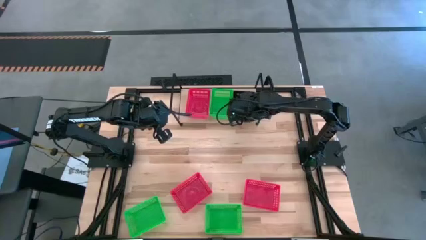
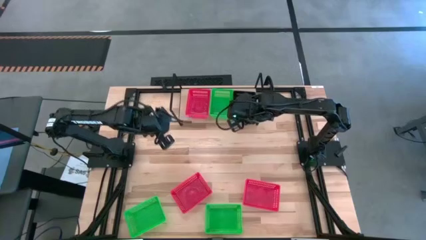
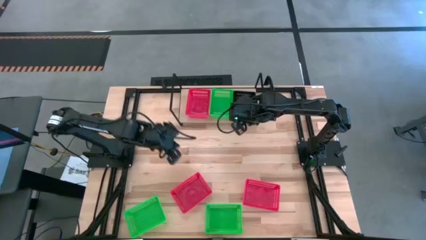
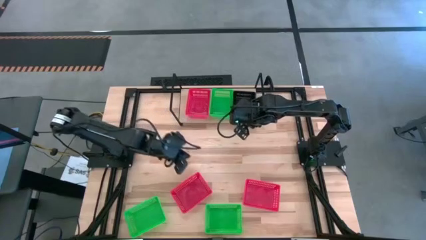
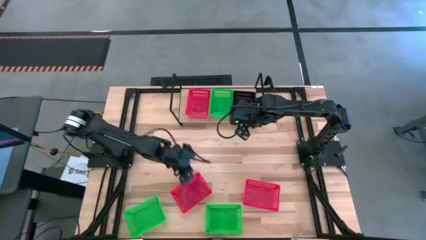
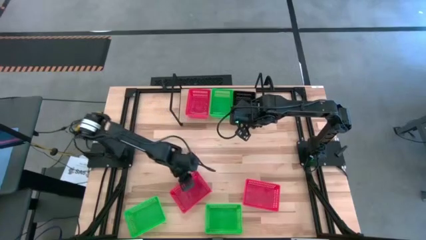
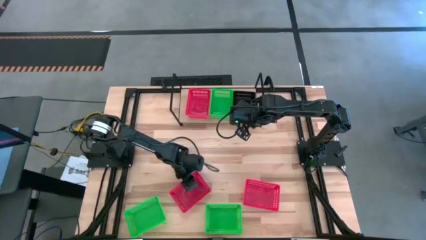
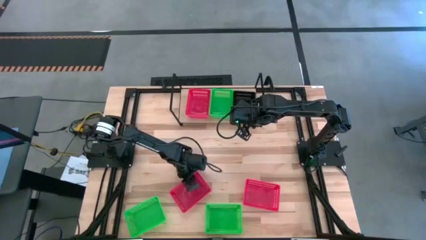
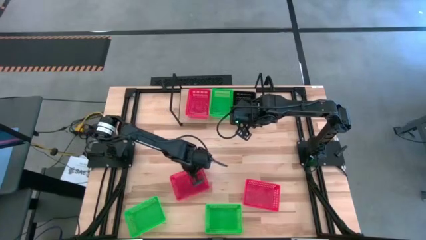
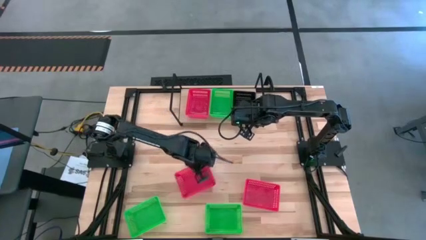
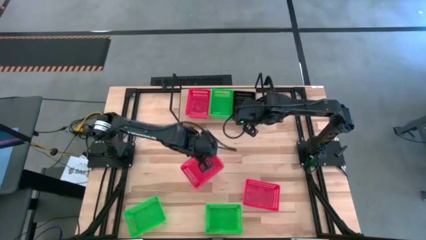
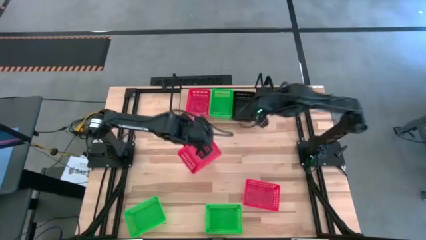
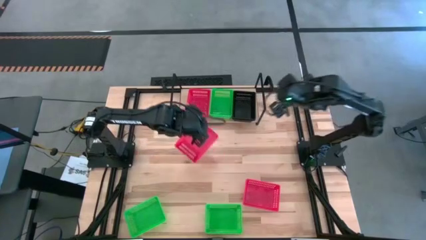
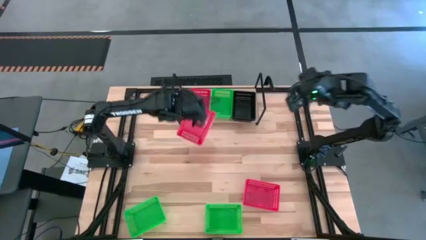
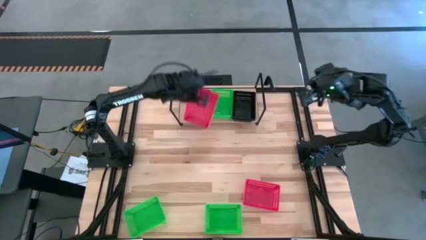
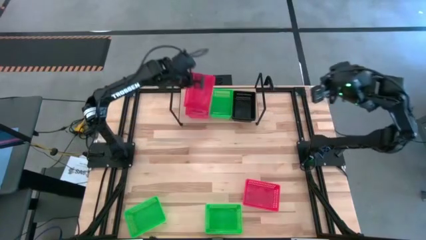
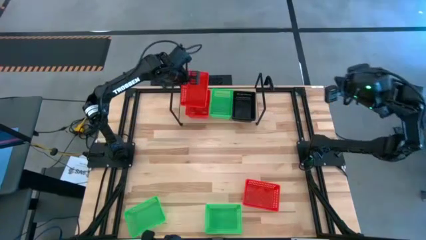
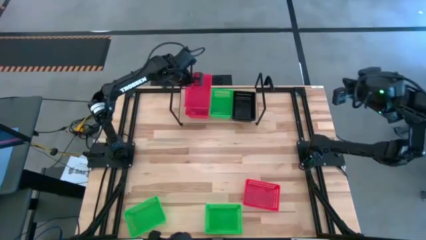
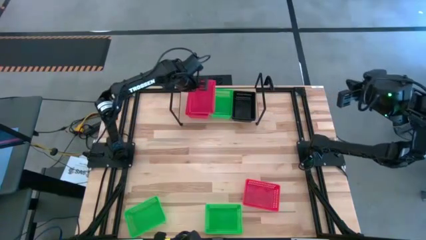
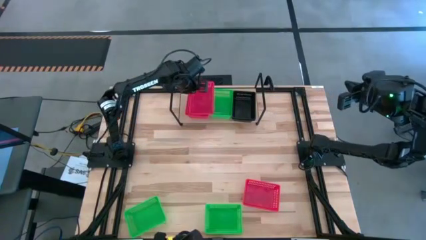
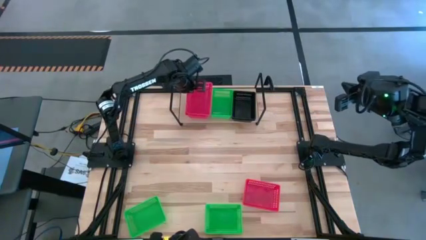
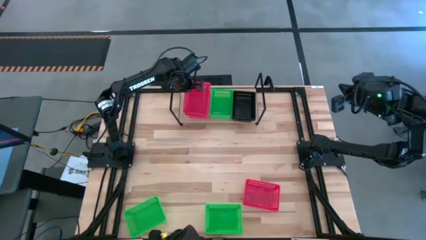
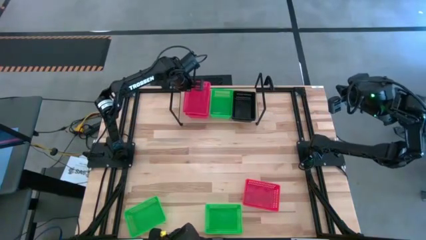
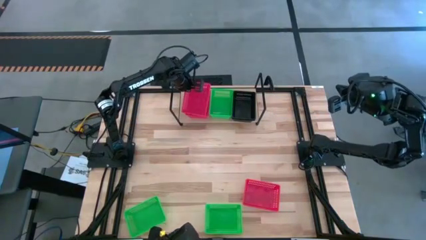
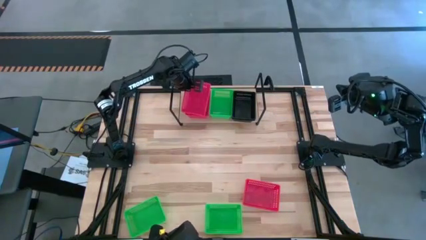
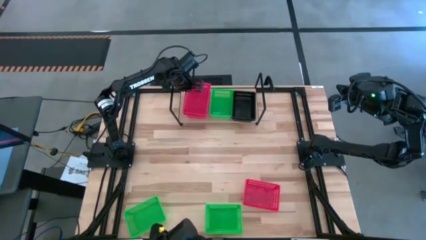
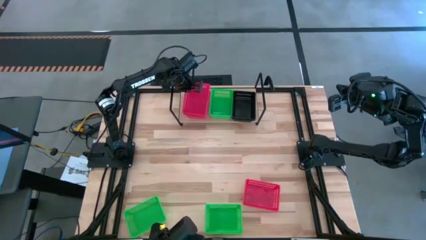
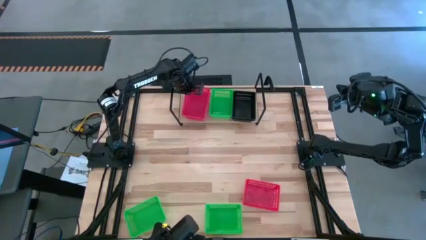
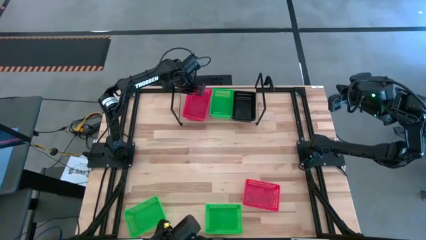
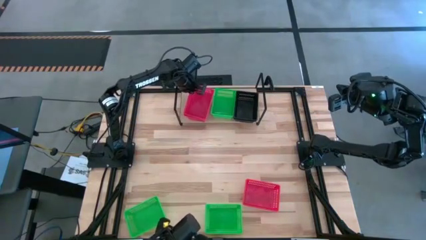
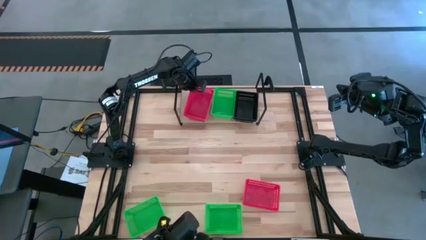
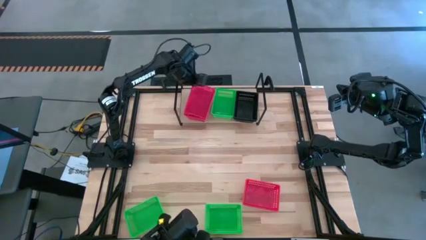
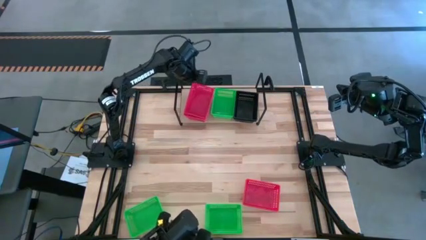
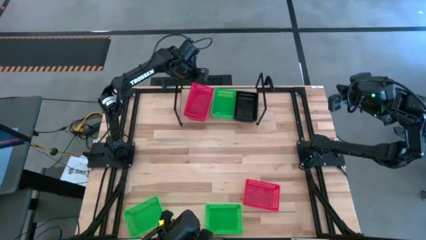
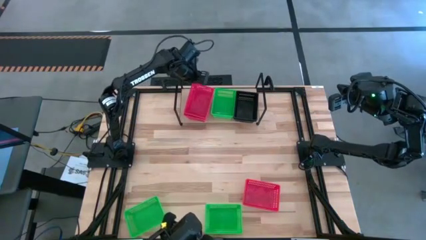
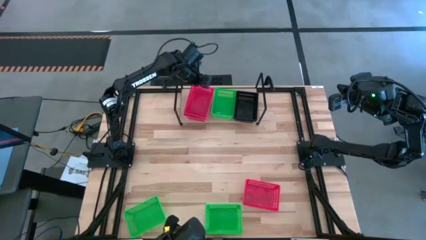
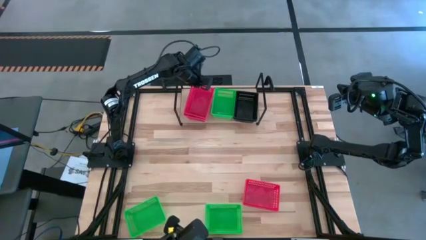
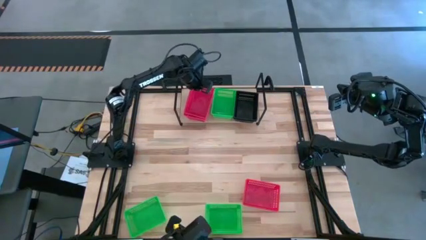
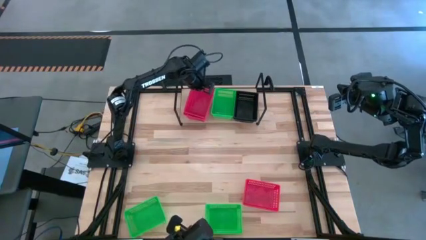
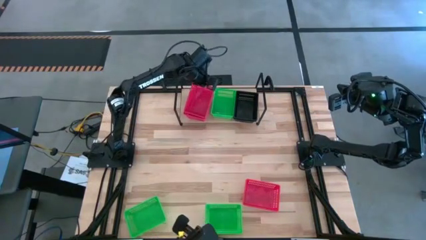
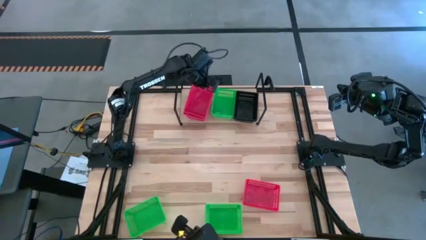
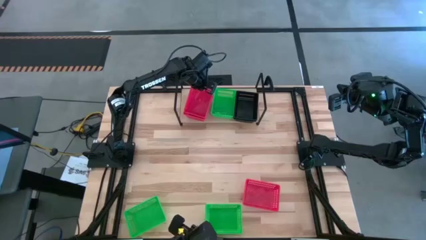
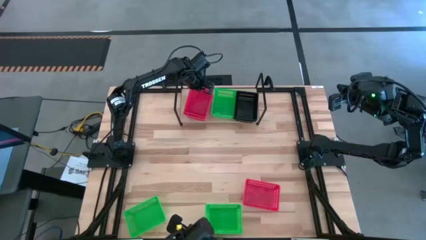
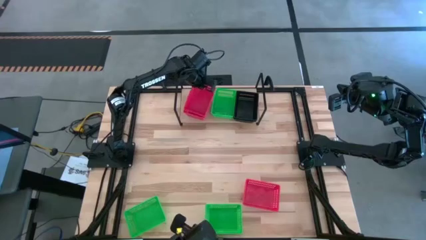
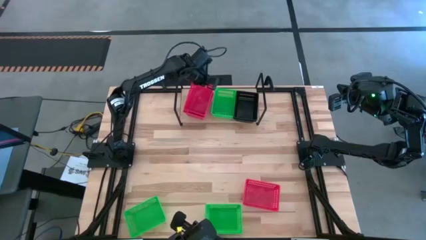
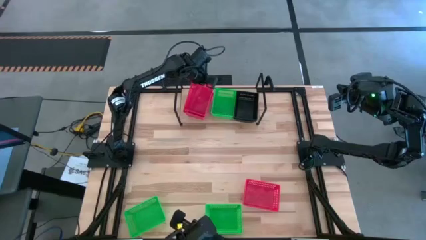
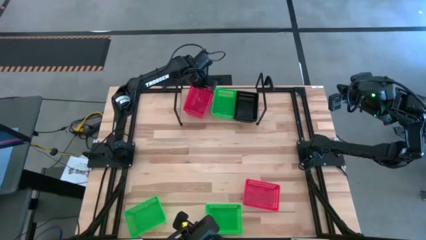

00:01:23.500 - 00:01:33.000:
Task: Stack baskets on shelf by color
Stack the left red bin on top of the other red bin on the shelf

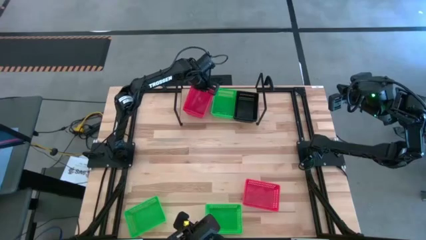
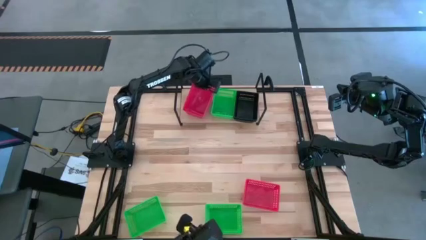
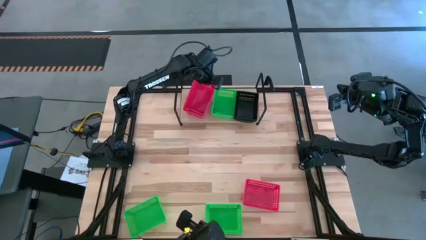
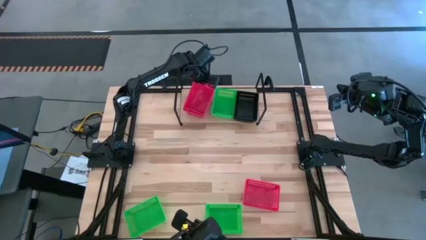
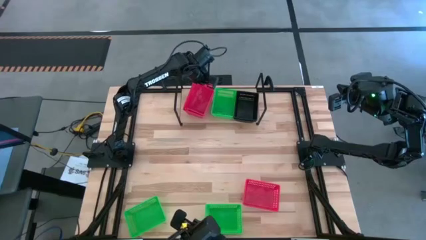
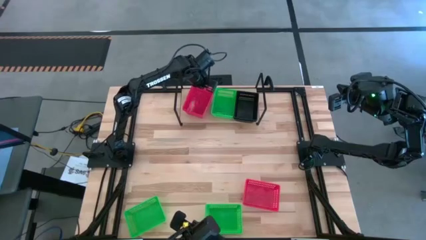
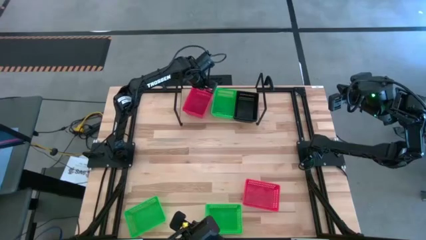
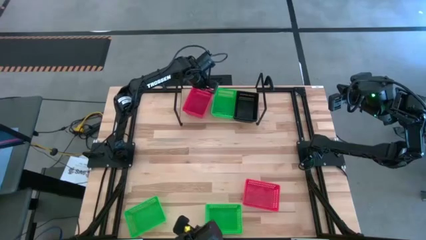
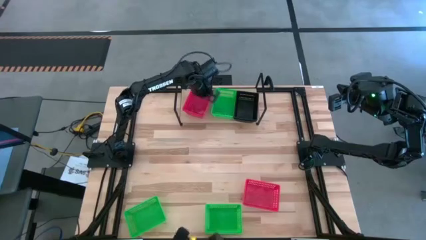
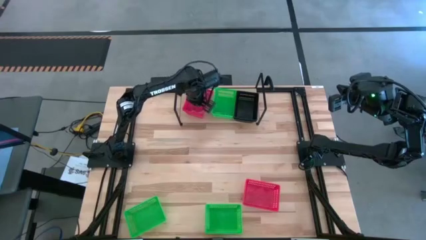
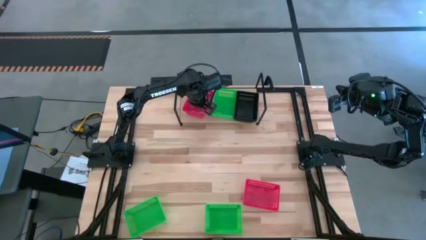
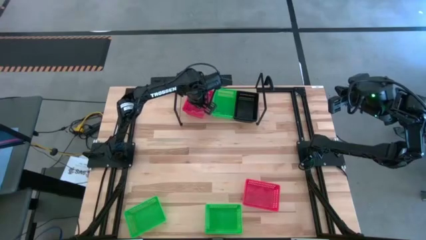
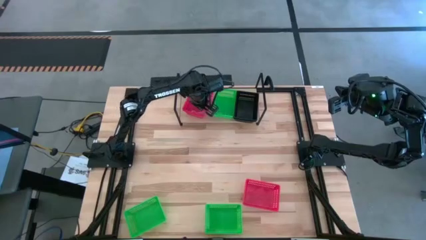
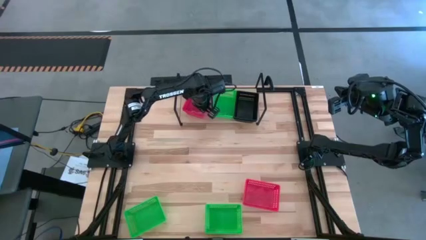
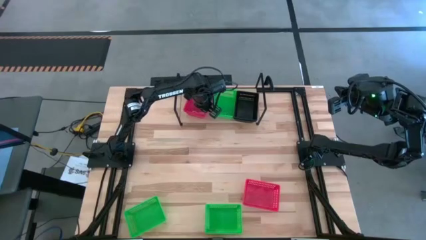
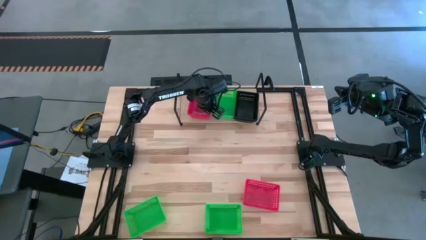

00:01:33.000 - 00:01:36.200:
Stack the left red bin on top of the other red bin on the shelf

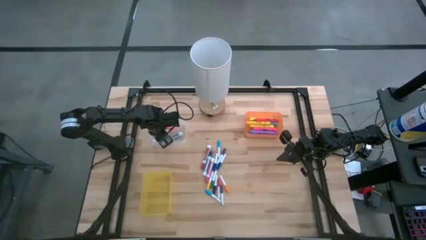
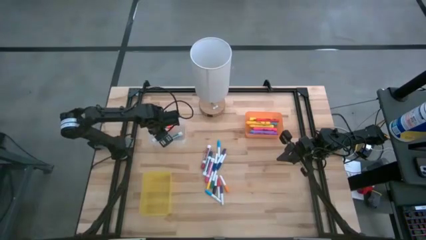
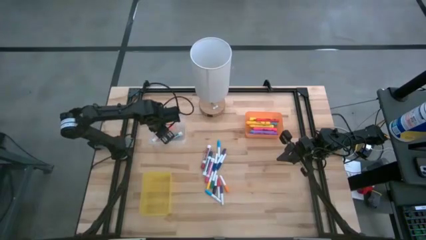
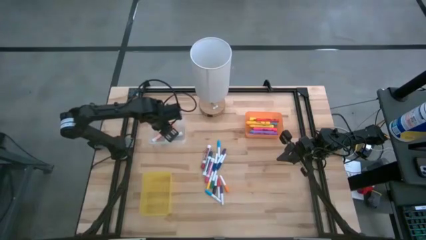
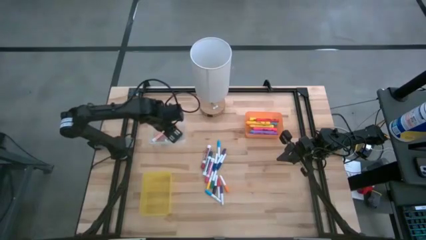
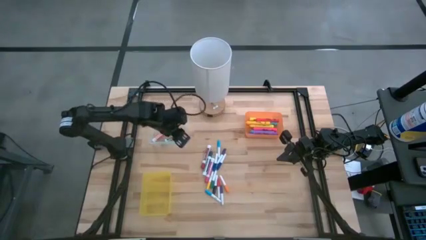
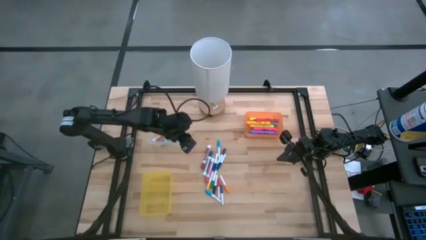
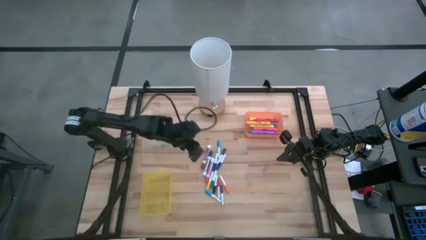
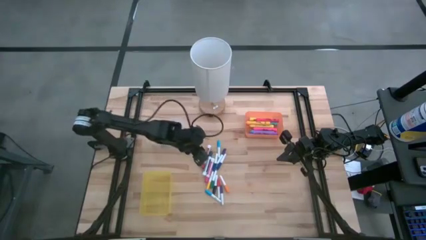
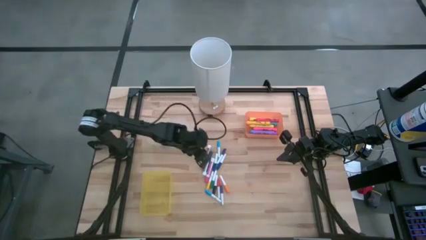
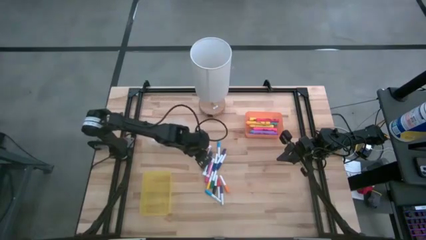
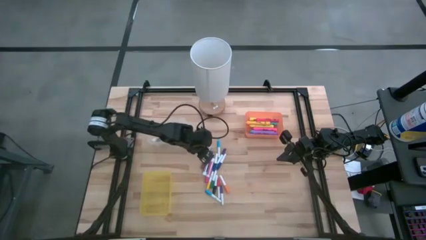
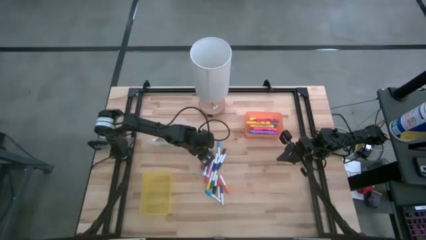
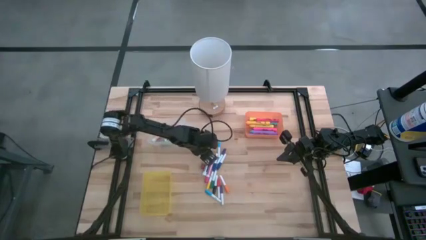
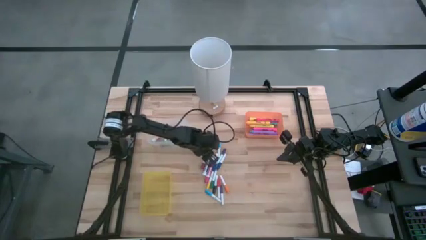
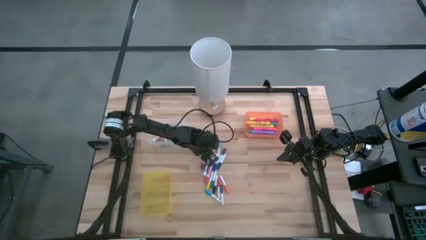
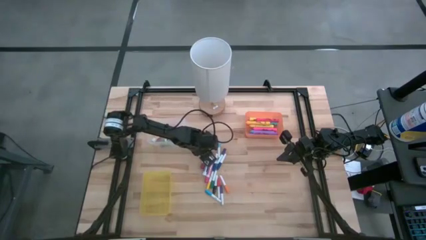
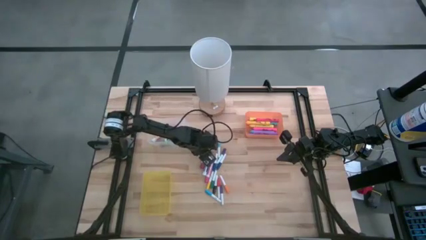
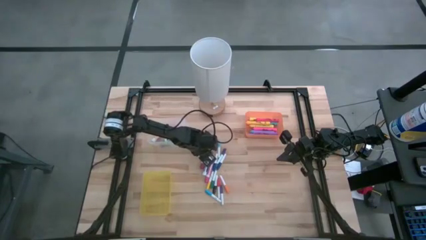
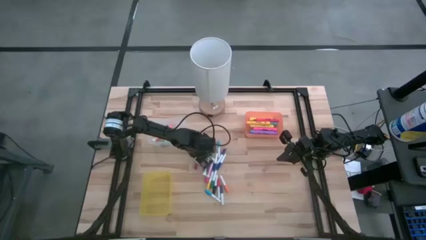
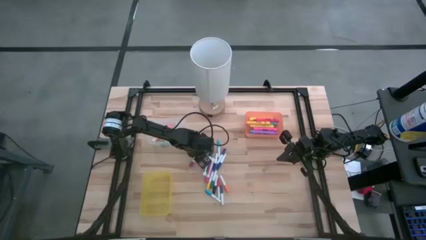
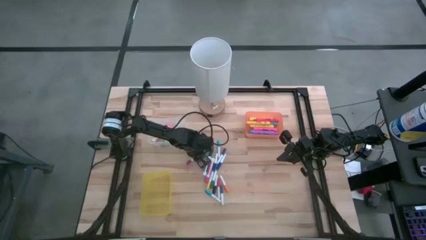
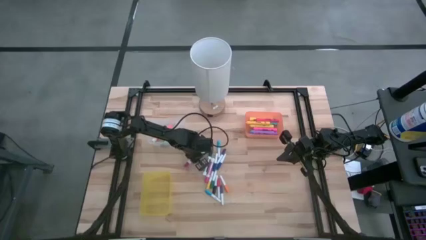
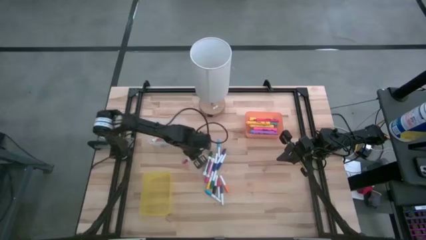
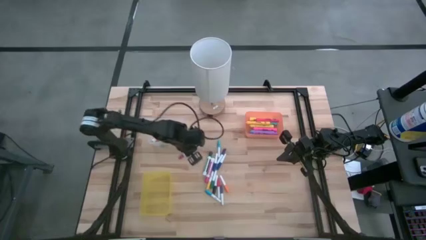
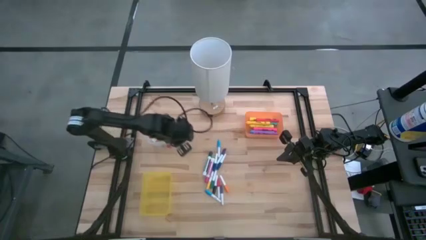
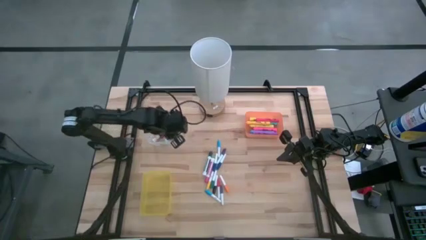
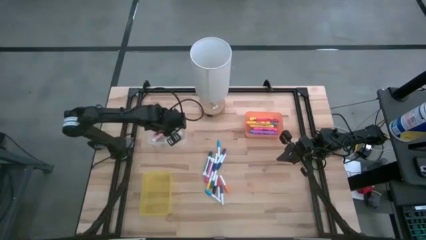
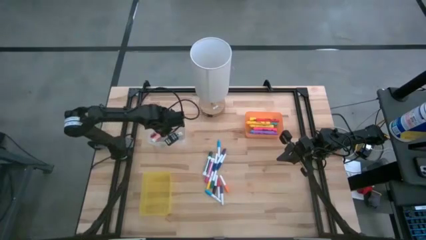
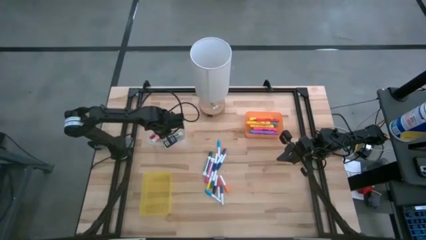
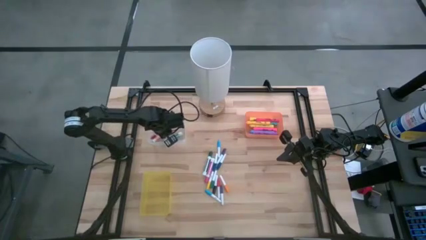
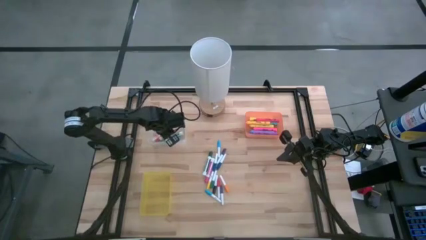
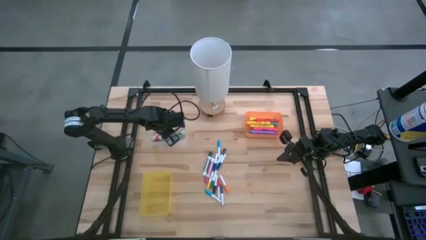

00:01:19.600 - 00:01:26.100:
Task: Pick & Place Markers
Put the red marker pen into the white bin
